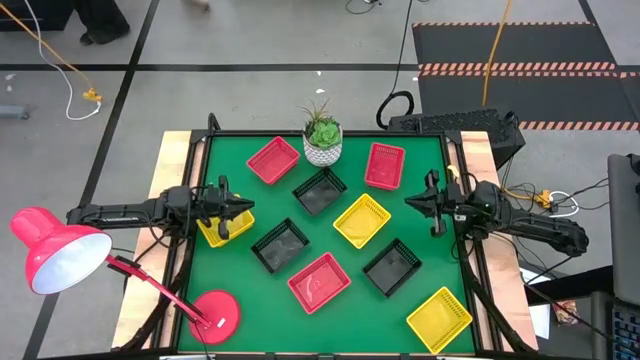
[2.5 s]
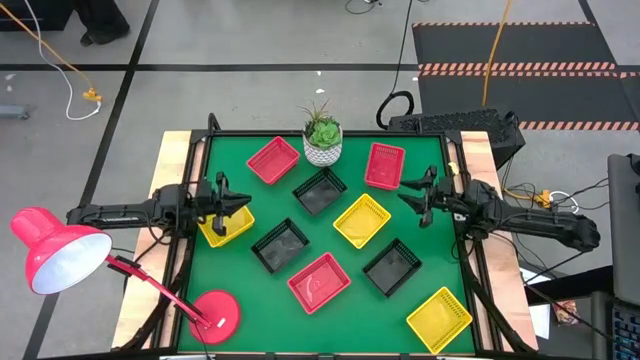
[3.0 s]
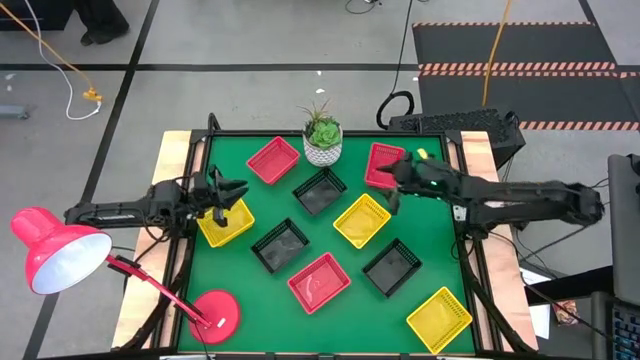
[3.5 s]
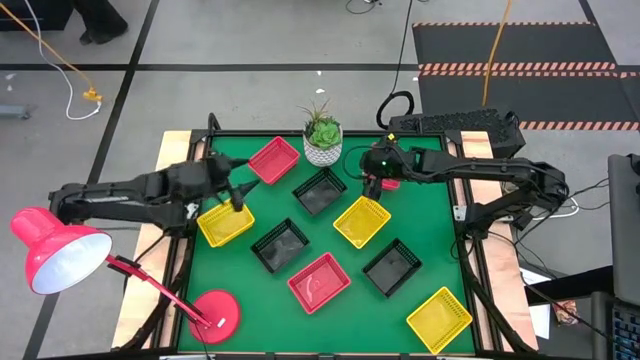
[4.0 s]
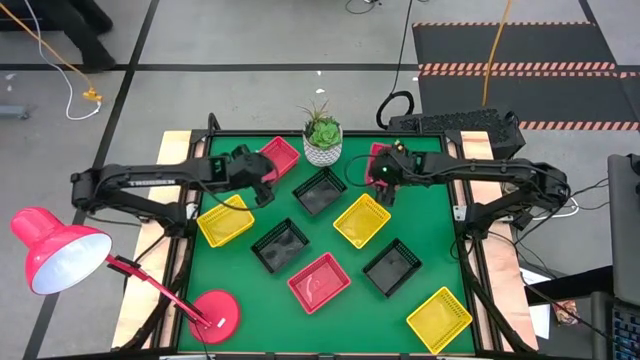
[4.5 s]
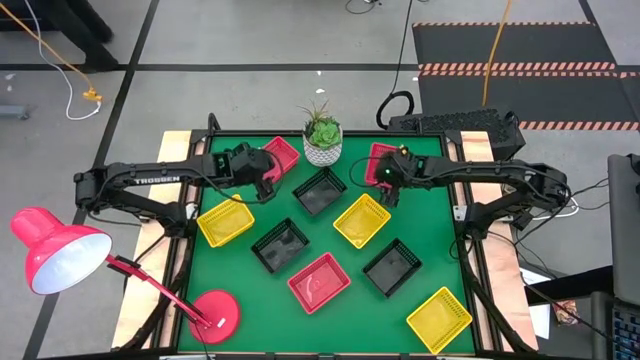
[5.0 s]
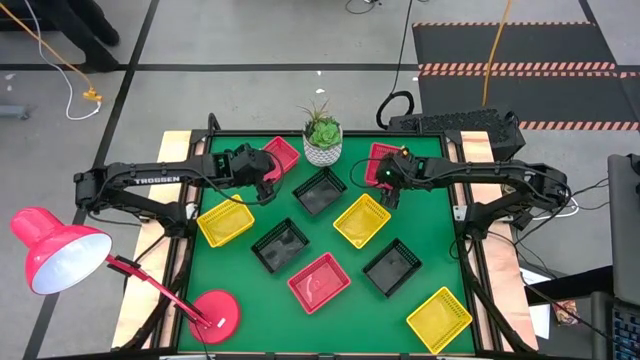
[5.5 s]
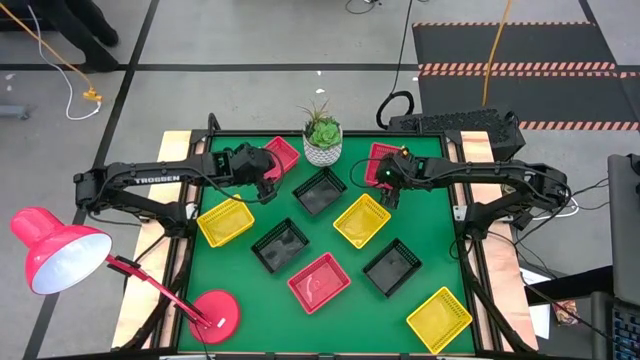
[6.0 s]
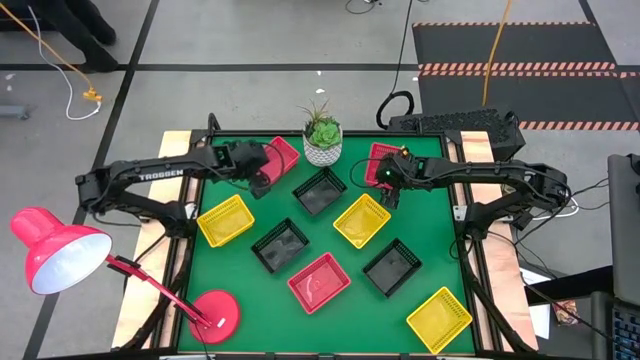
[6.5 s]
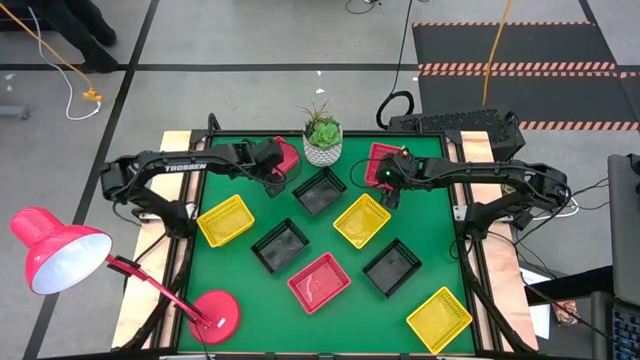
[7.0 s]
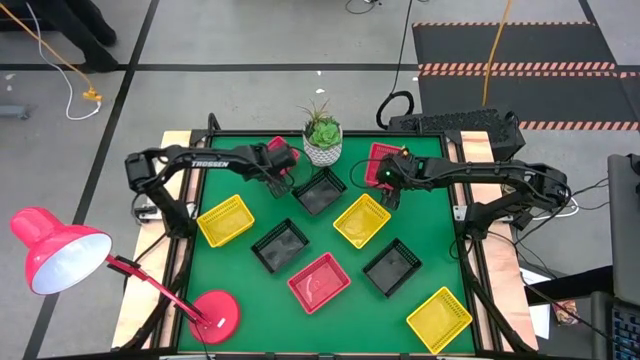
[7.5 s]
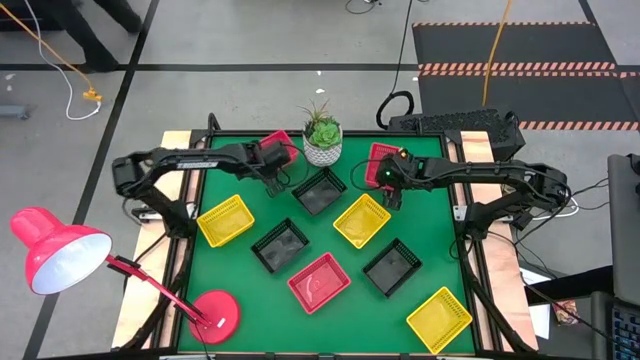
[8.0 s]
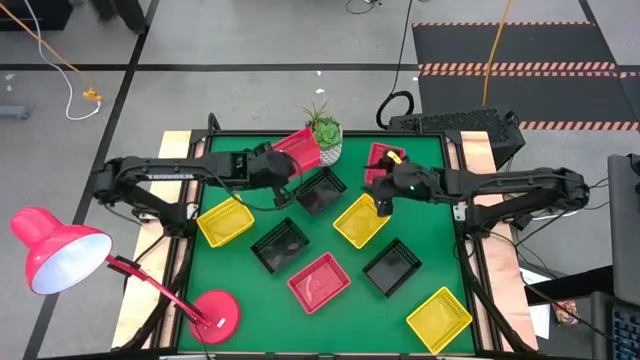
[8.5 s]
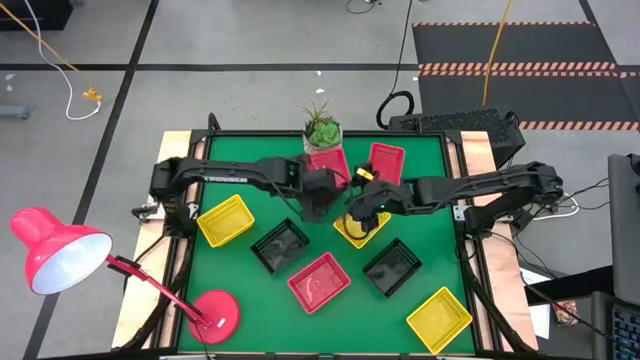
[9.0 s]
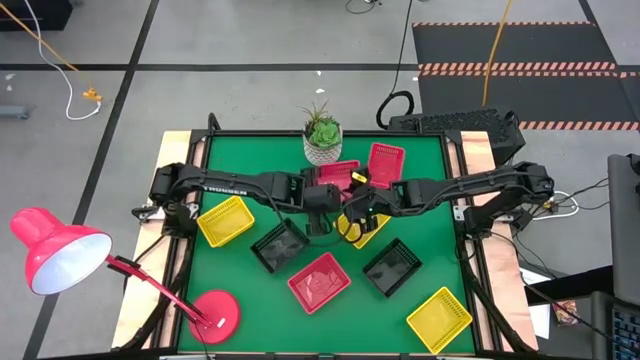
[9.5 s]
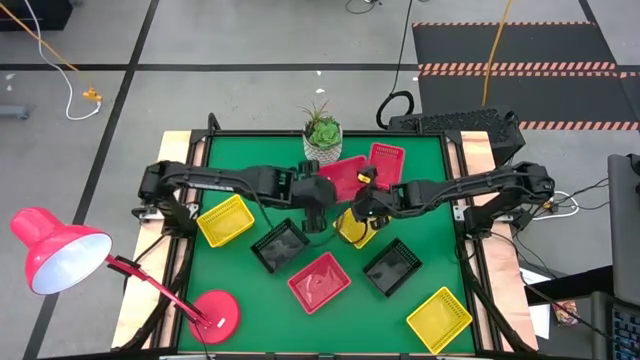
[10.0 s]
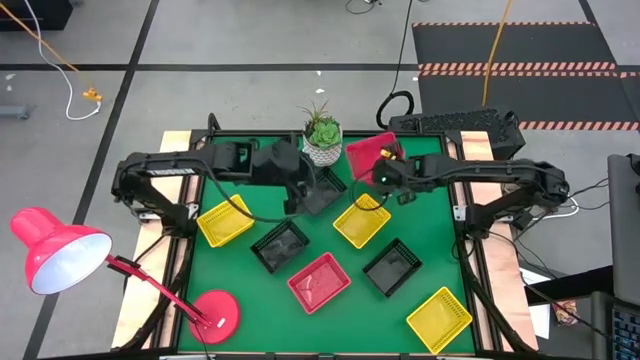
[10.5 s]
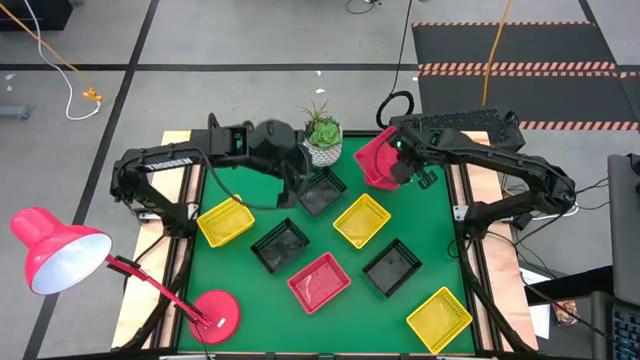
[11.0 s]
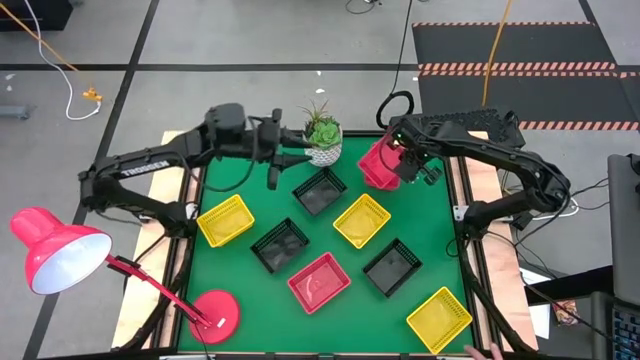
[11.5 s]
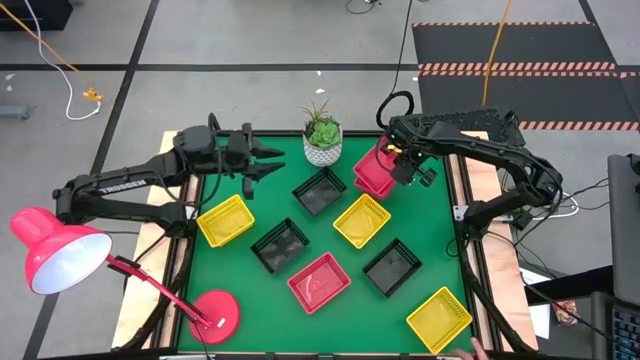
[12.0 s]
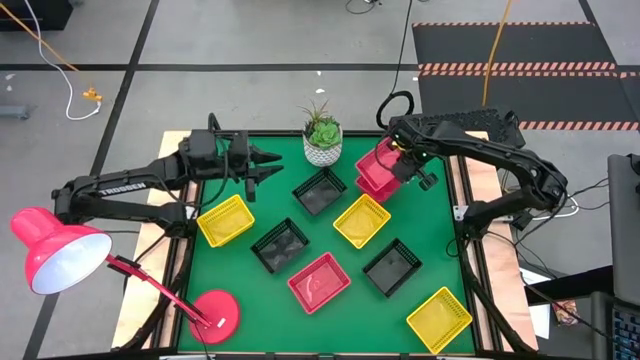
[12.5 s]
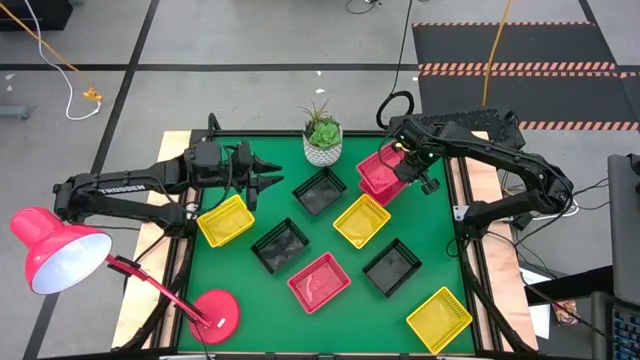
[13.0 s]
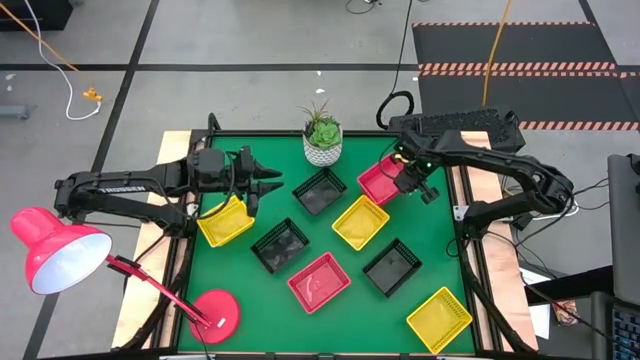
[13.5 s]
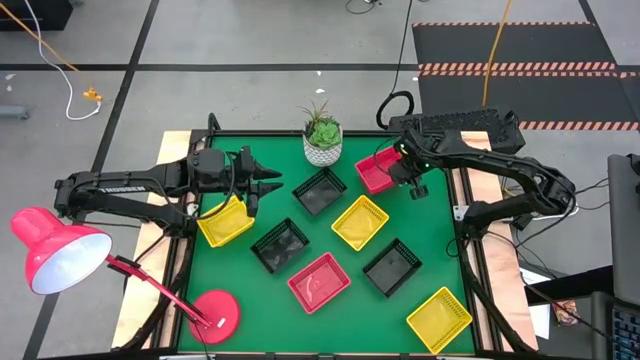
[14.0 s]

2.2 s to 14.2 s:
Stack the top left orange bin on the top right orange bin

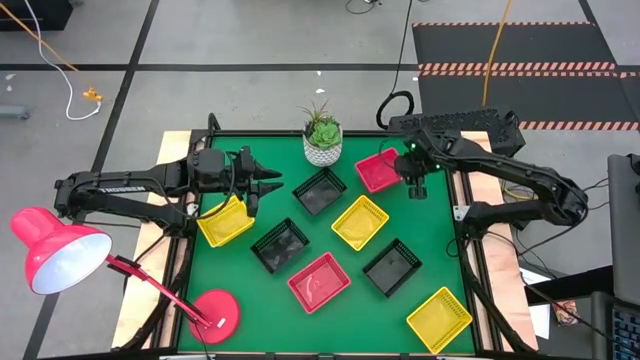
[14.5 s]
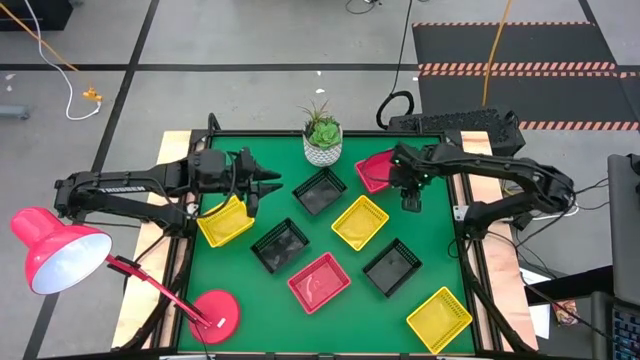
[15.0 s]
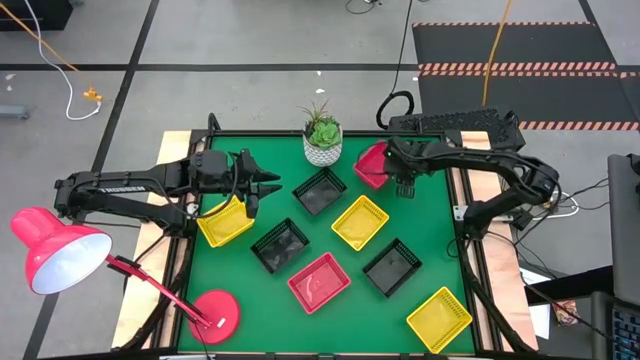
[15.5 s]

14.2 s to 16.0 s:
Adjust the orange stacked bins
